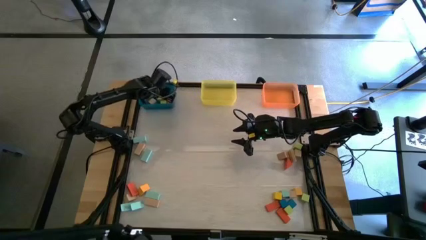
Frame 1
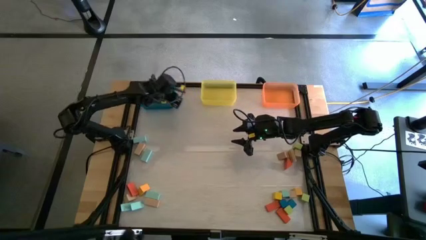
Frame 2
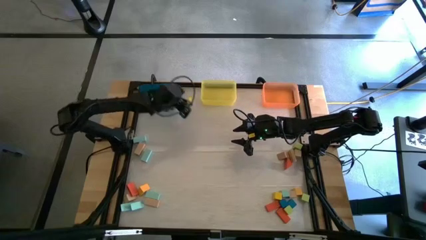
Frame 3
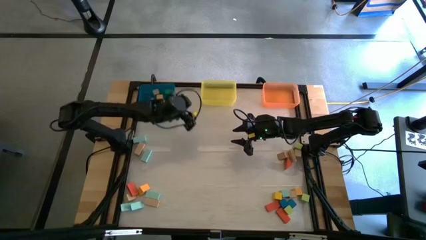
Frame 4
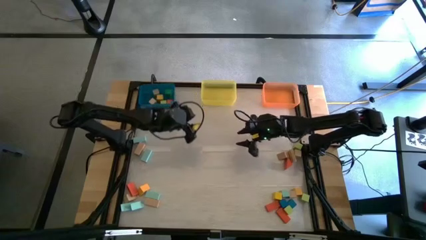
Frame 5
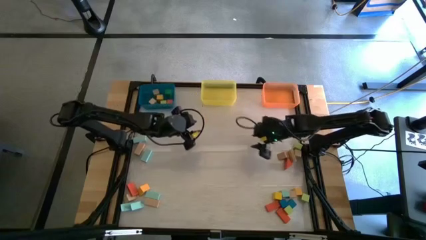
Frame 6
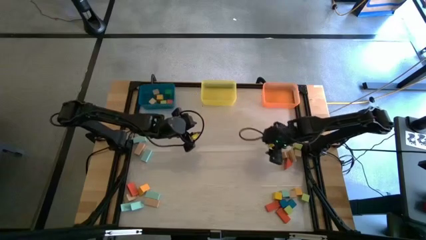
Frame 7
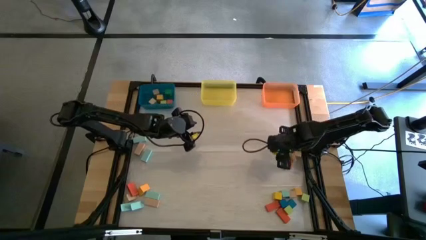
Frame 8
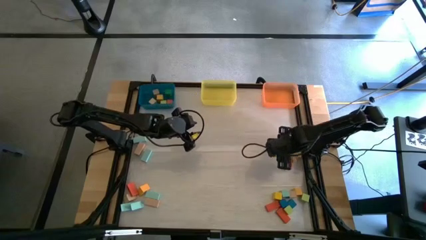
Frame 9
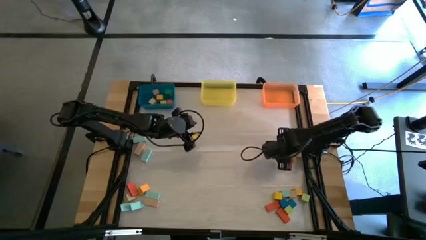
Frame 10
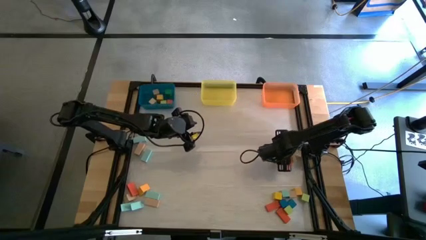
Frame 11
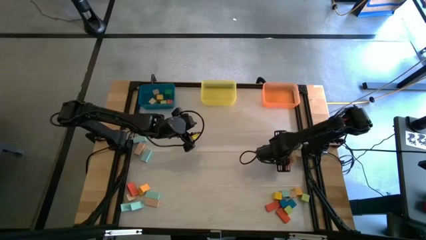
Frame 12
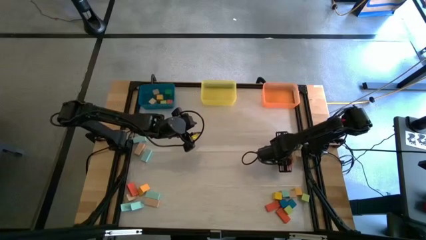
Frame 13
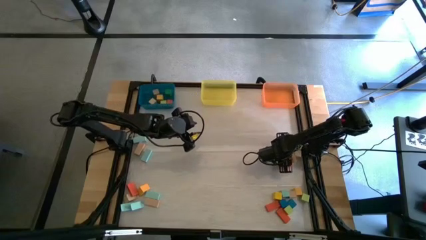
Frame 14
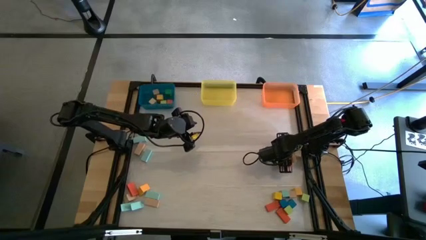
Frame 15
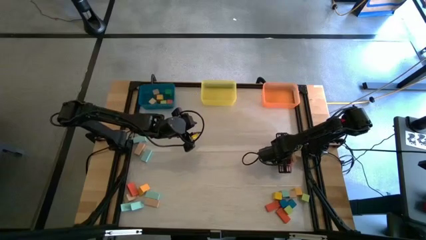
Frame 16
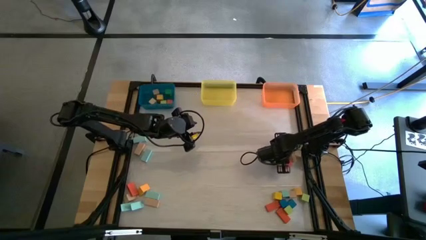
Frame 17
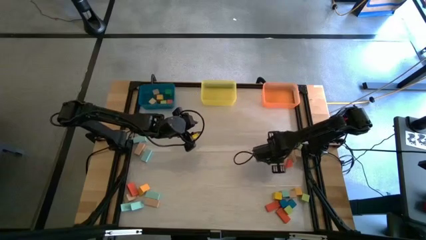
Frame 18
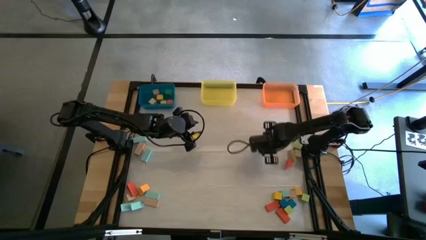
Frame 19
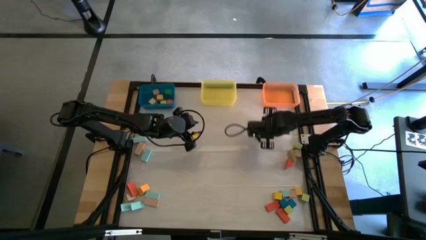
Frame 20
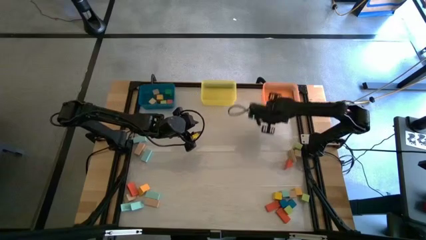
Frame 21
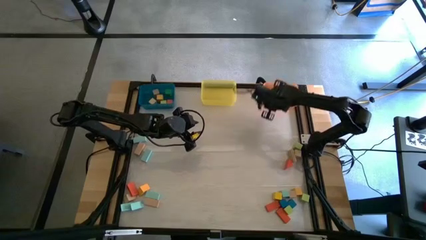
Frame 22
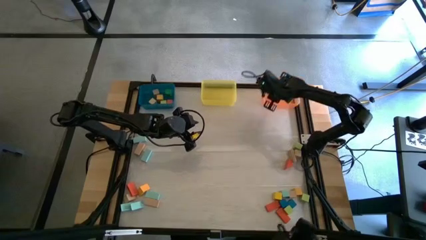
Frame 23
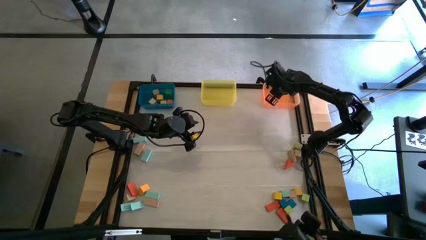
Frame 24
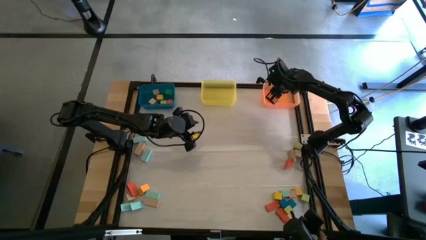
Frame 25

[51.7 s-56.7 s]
Task: Sort blocks by size
Put the brown triangle block into the orange bin

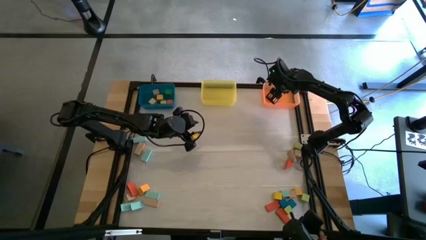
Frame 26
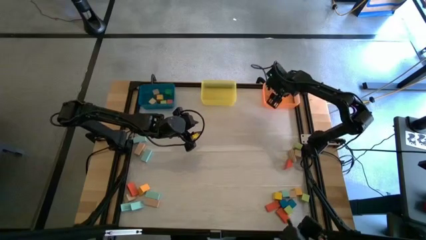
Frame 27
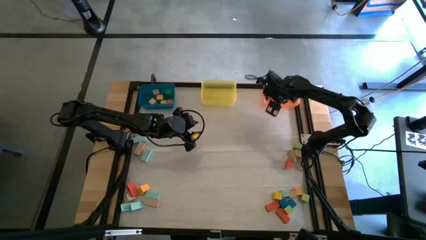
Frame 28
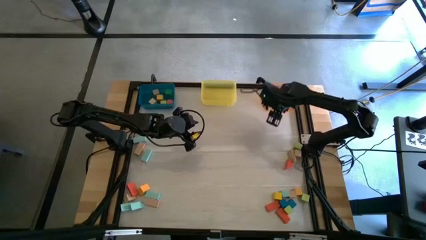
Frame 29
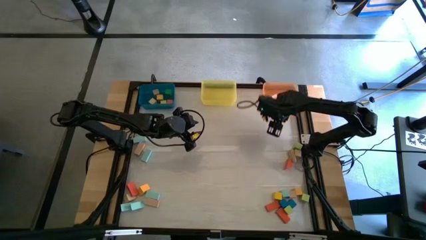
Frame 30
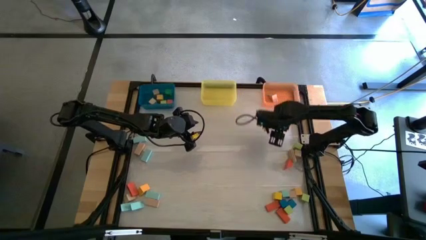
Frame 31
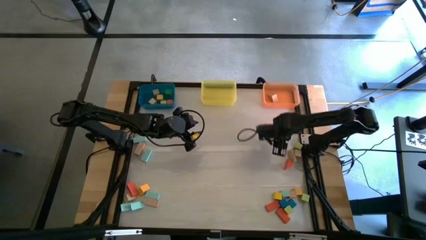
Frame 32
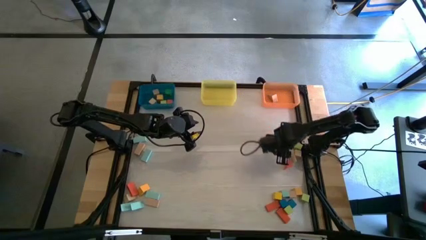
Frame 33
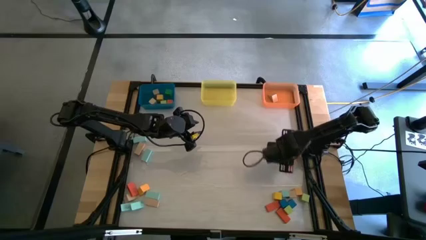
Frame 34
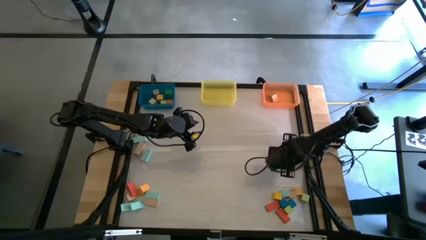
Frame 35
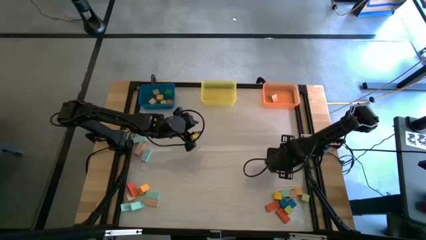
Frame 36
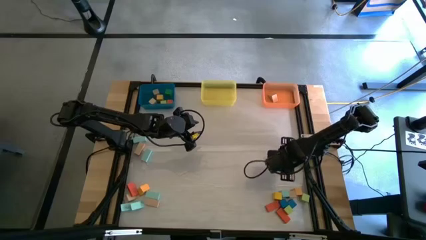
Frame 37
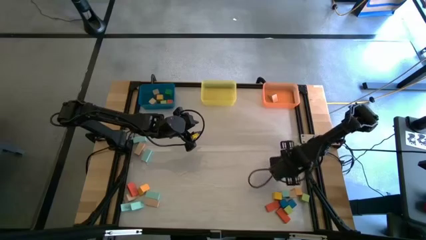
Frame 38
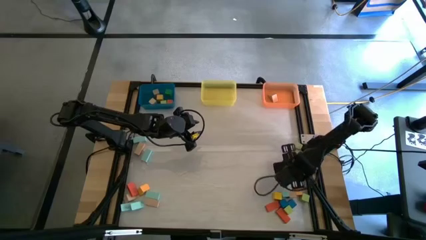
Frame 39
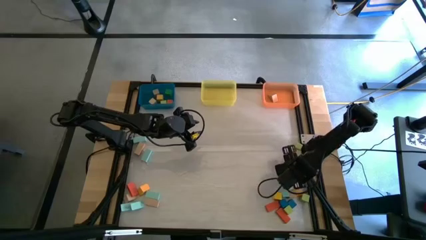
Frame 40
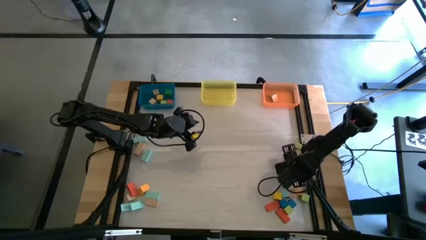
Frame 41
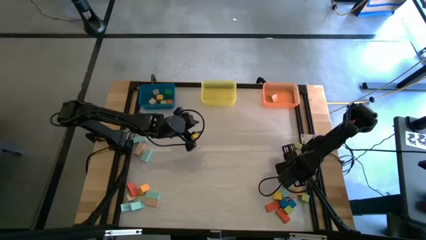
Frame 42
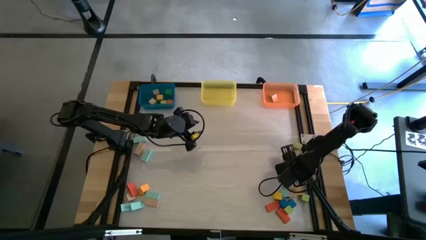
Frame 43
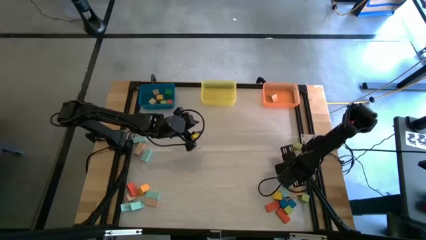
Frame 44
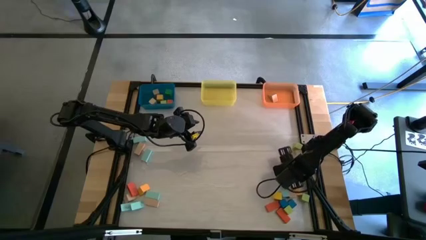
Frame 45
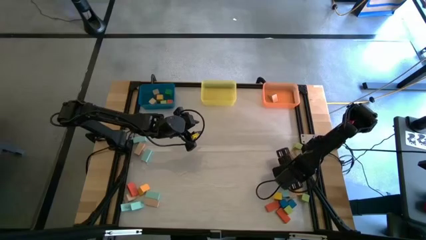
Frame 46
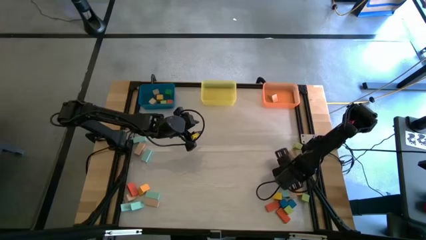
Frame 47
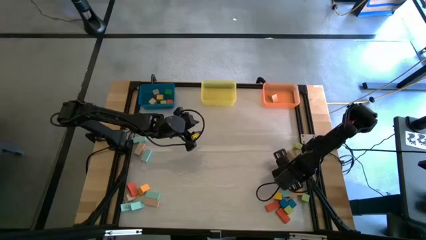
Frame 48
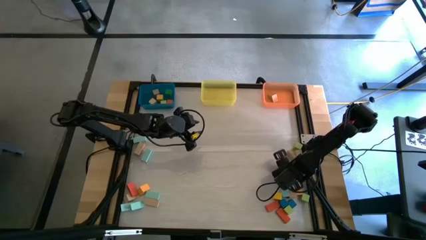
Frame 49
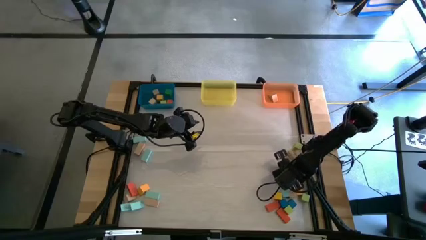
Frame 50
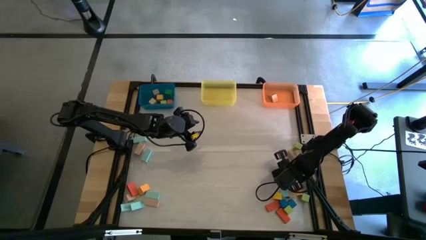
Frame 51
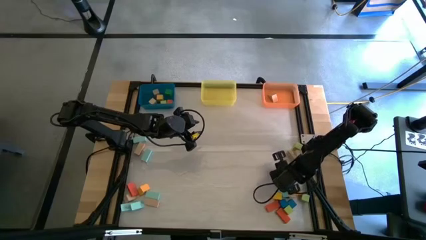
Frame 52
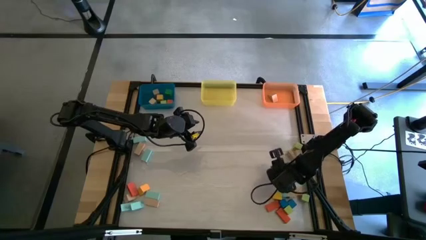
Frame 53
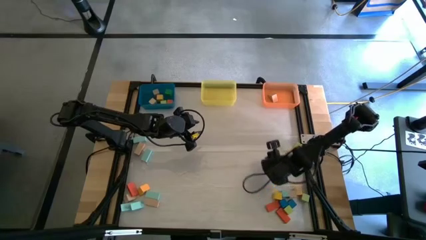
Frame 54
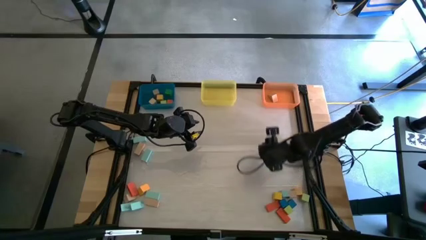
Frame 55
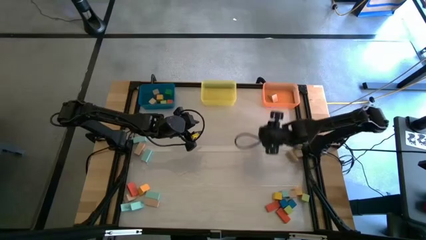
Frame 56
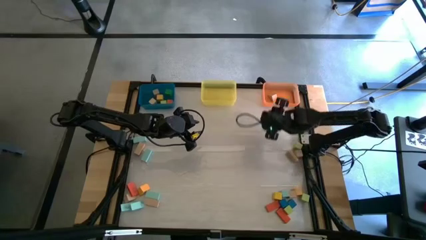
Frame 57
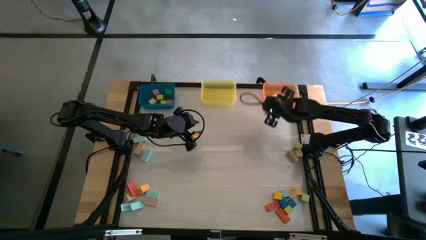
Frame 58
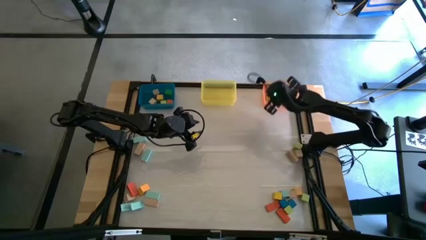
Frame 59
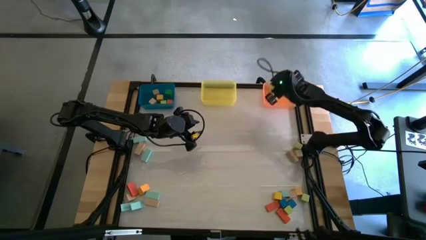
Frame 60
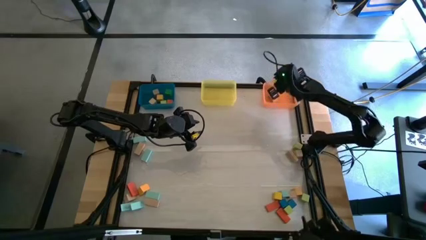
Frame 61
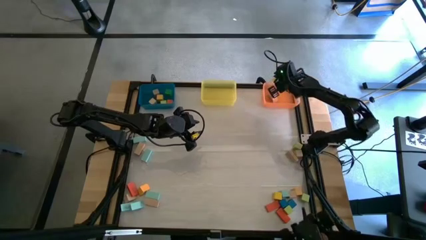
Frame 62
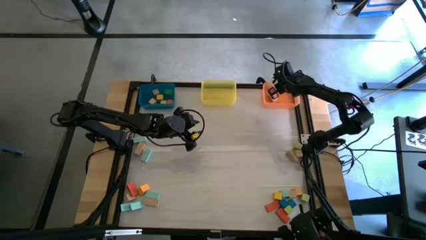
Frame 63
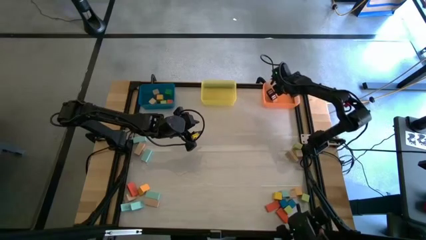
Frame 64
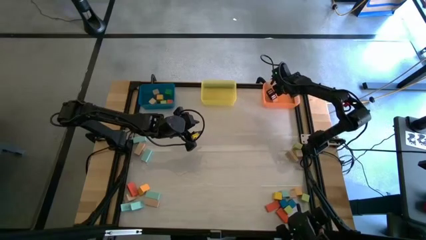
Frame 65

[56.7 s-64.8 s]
Put the orange triangle block into the orange bin

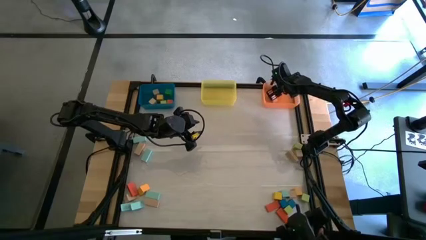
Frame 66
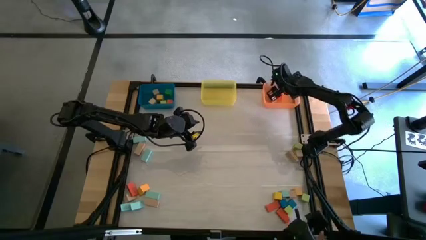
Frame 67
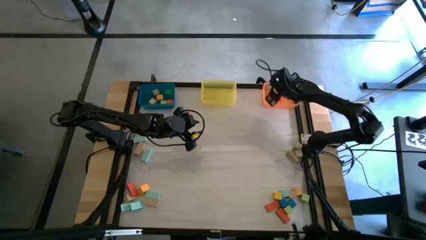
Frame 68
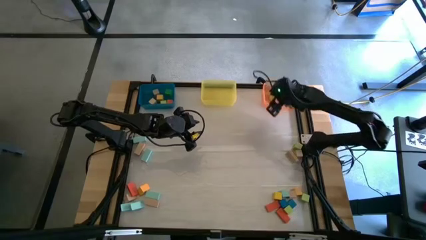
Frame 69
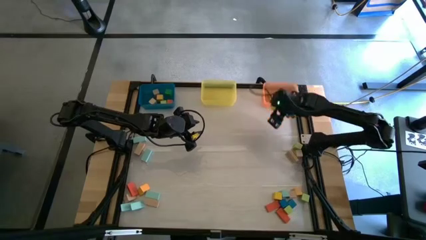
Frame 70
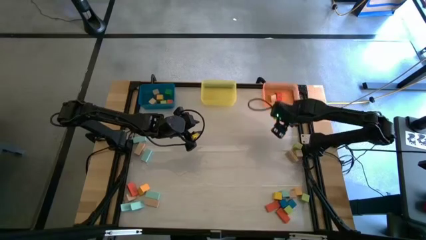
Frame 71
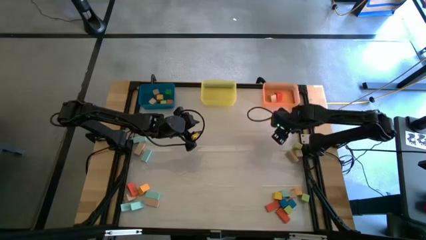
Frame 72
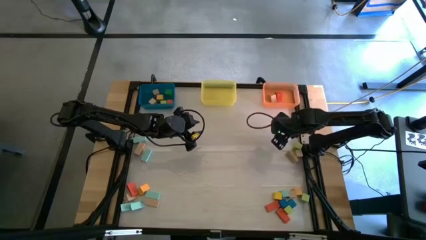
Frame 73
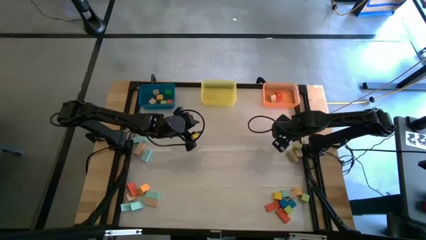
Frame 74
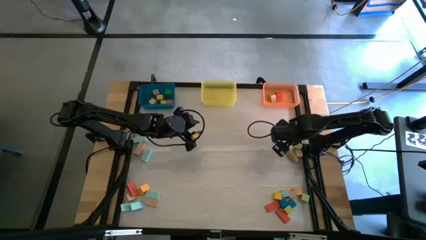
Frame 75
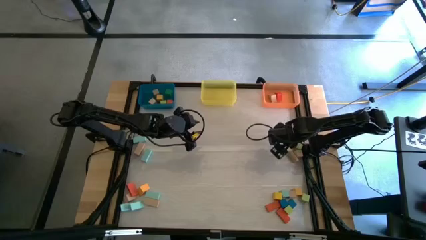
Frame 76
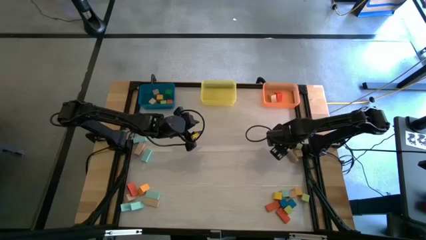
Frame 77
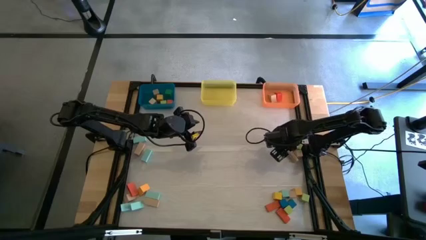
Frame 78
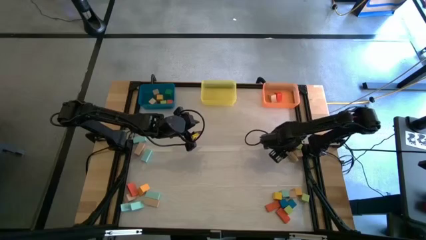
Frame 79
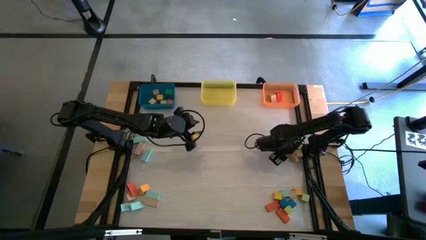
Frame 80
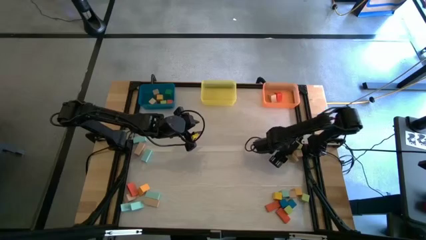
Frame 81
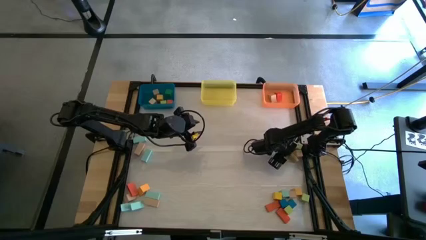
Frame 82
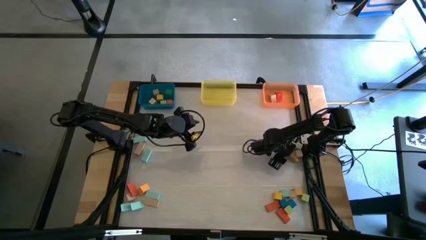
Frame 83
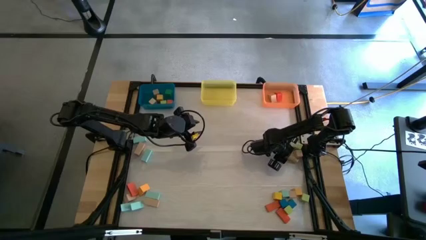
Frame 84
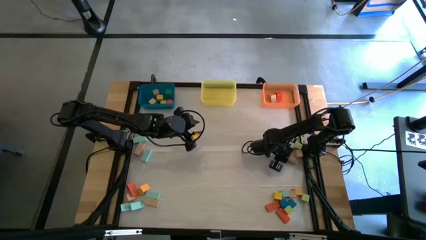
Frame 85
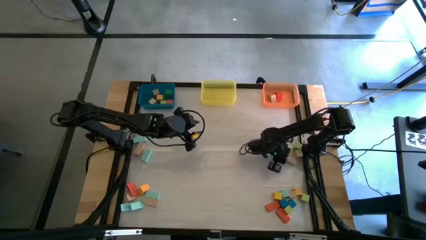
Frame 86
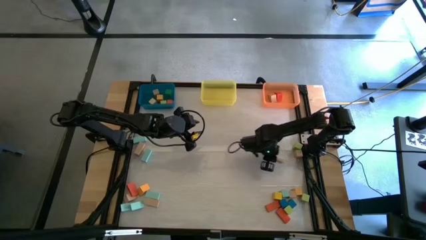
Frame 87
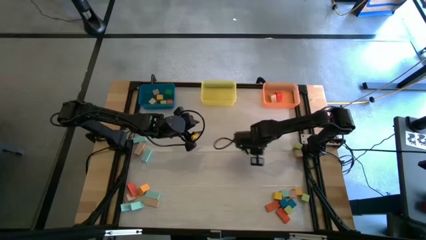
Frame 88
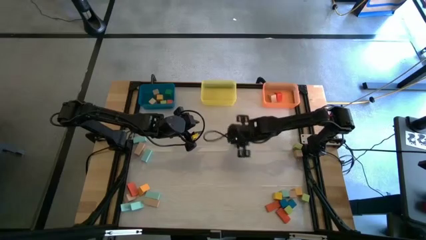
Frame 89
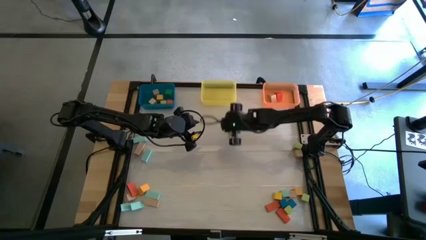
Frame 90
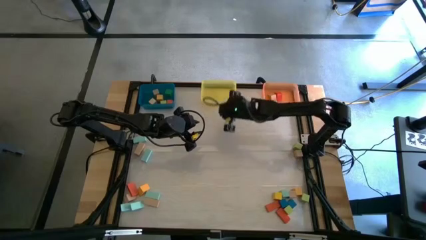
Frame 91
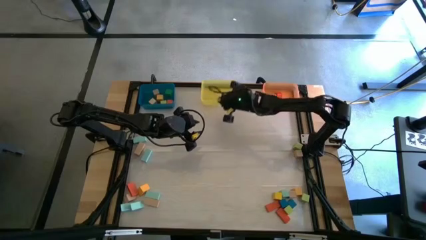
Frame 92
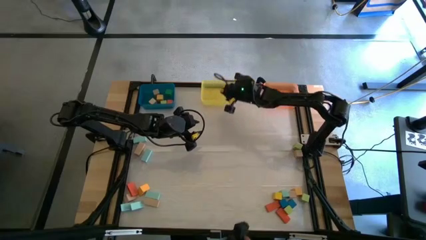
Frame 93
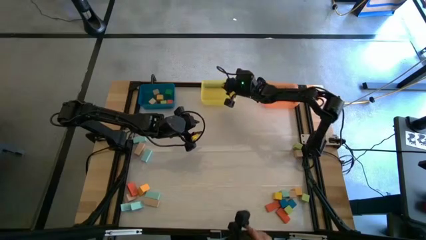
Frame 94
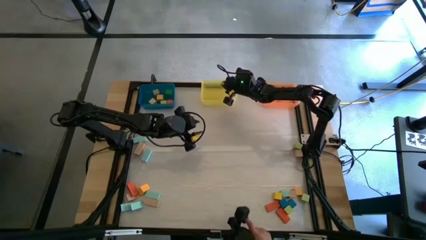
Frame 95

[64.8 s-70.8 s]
Put the brown rectangle block into the yellow bin
